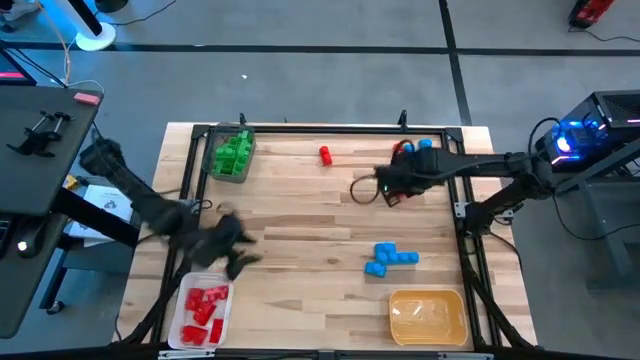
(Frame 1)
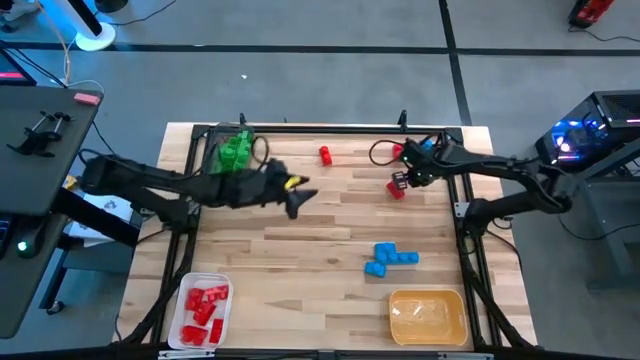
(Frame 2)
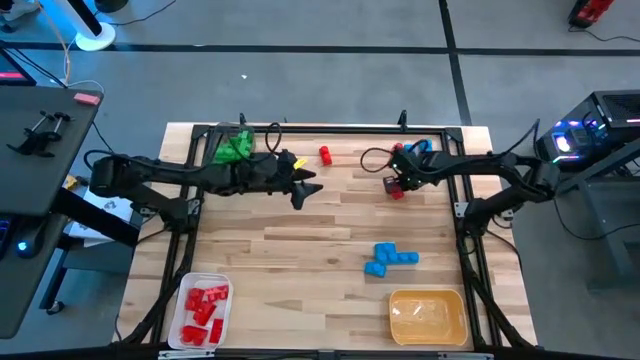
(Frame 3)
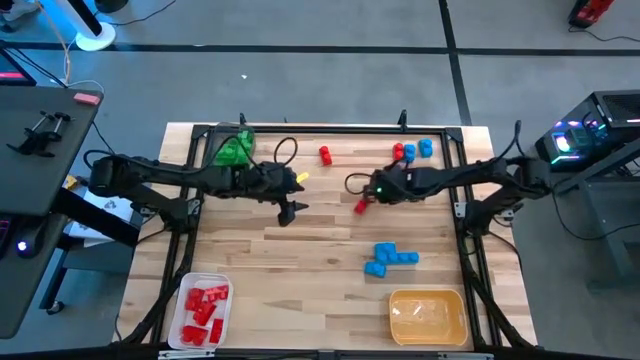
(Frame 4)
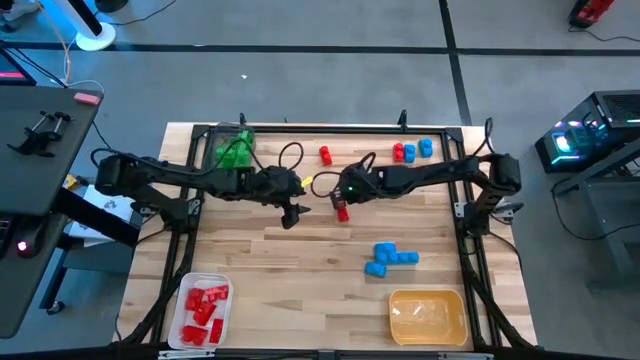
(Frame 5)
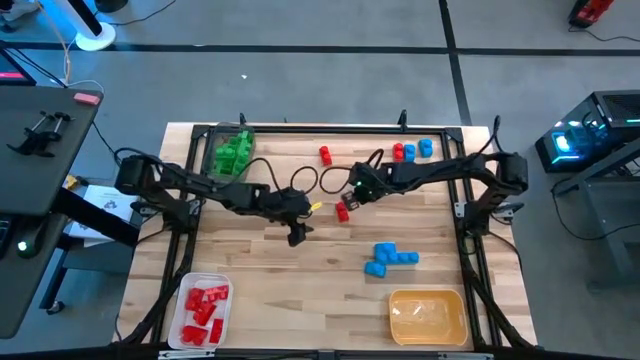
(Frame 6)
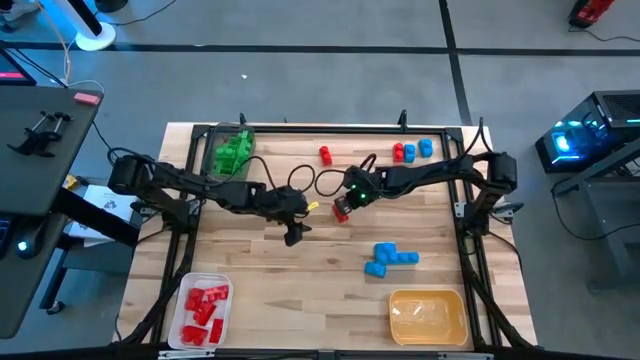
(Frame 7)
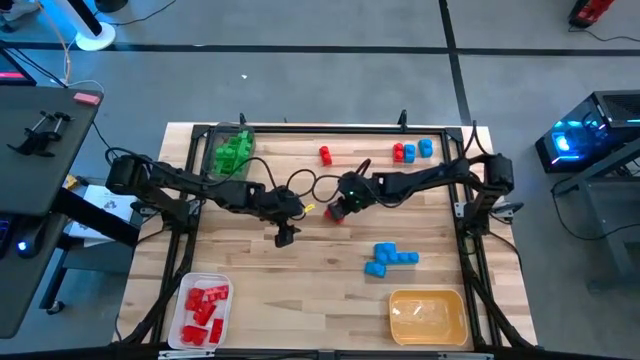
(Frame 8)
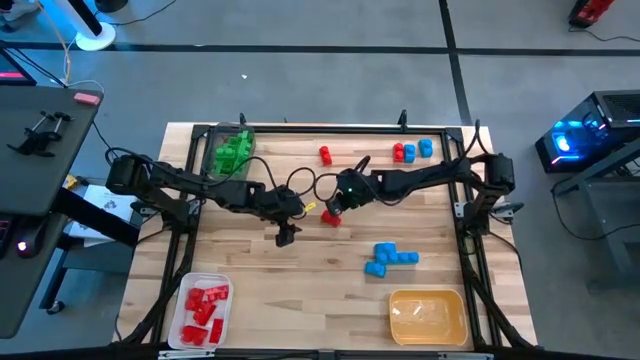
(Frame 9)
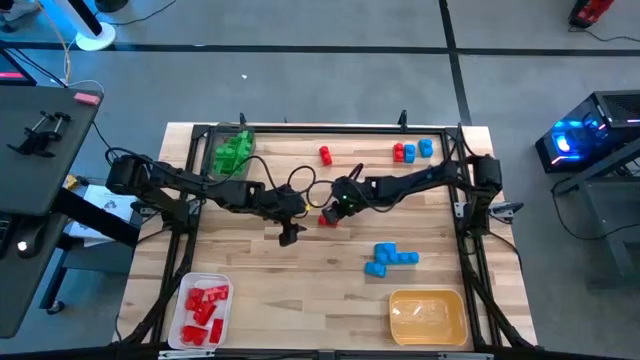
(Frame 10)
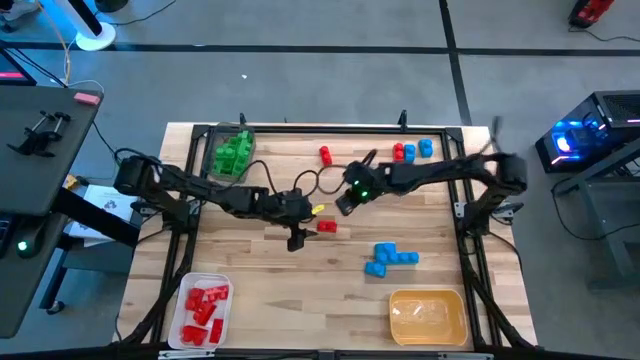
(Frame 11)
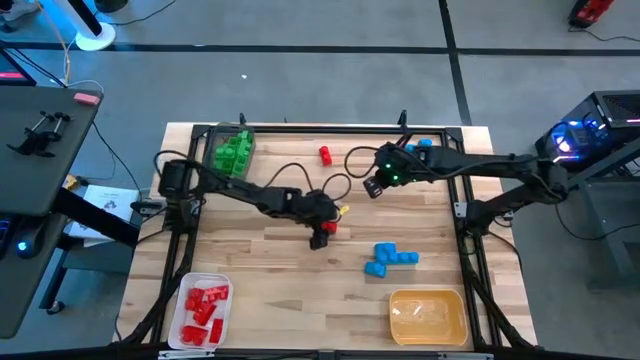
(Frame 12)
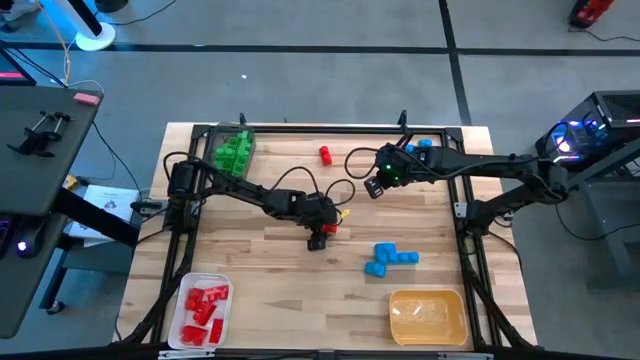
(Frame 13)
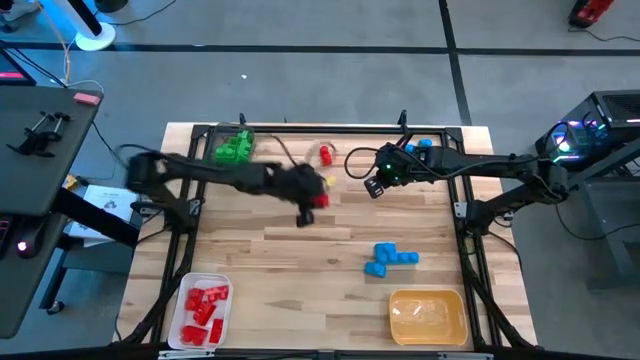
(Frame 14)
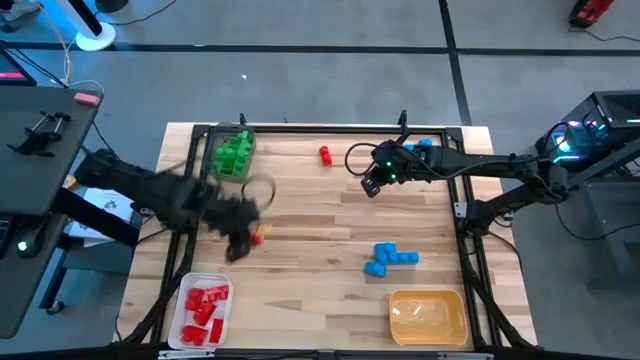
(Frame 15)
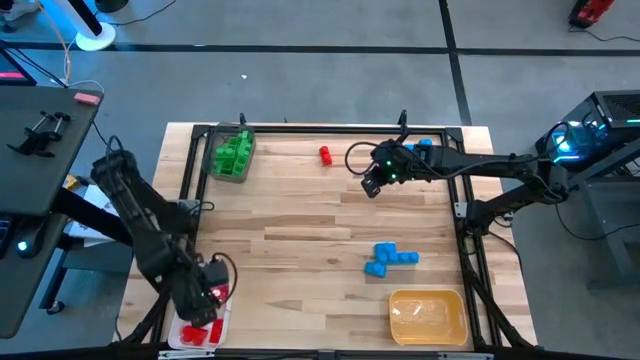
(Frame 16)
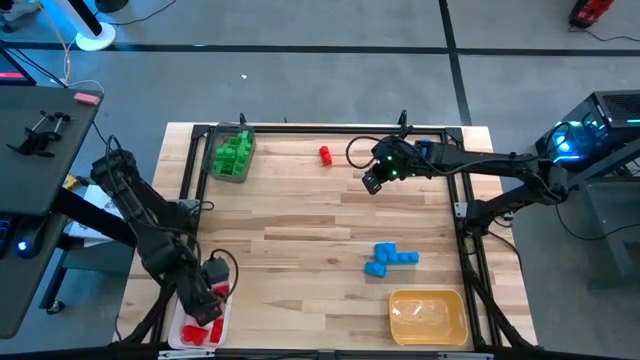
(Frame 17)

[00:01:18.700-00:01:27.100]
Task: Sort blocks
Put the red game piece into the white bin

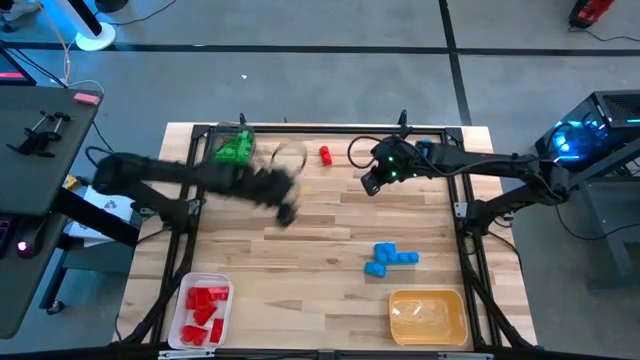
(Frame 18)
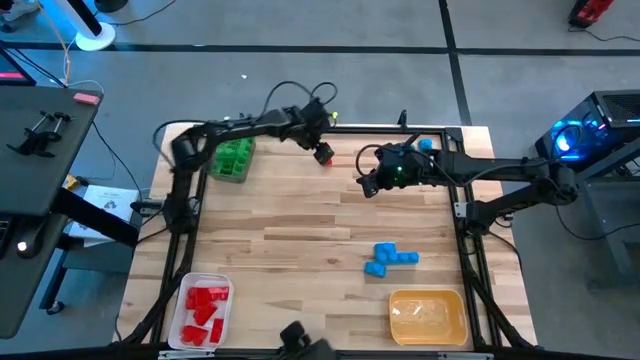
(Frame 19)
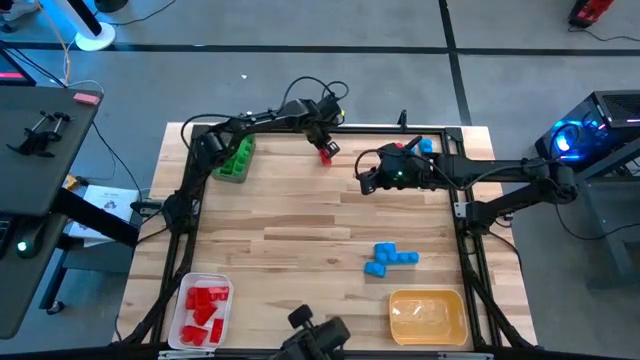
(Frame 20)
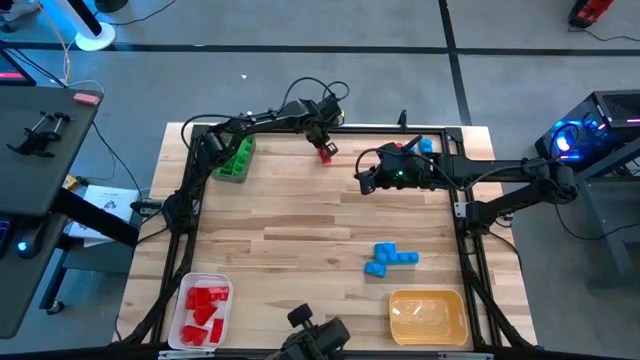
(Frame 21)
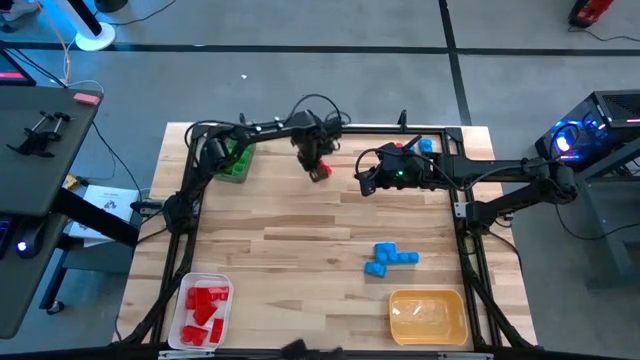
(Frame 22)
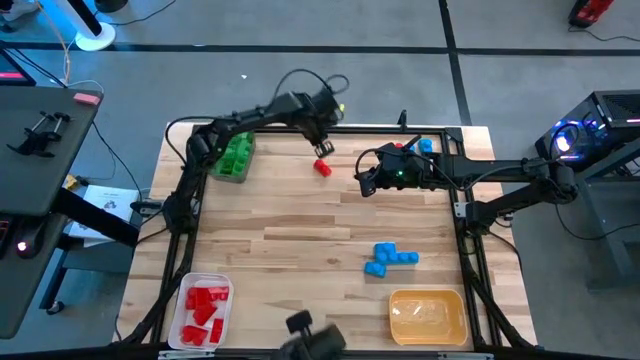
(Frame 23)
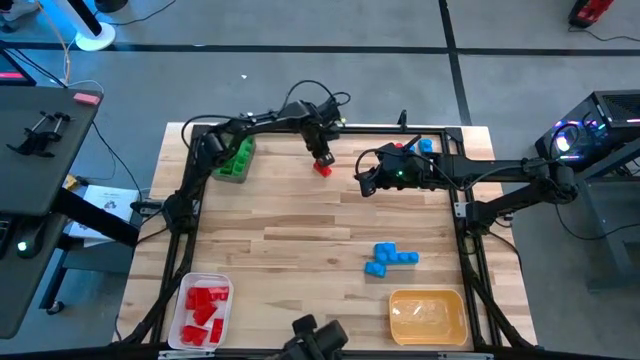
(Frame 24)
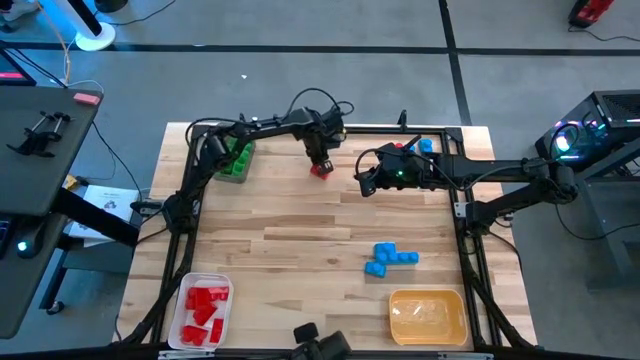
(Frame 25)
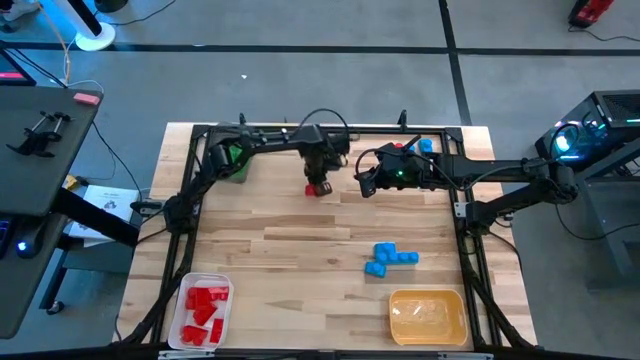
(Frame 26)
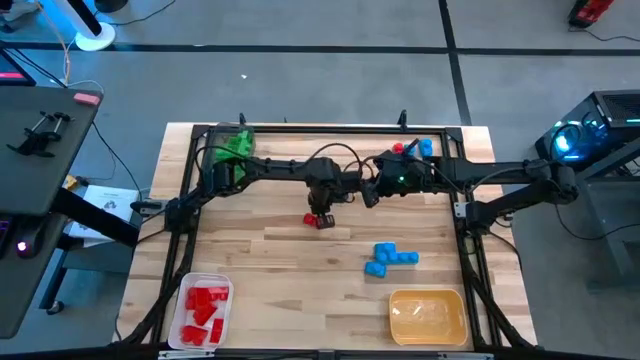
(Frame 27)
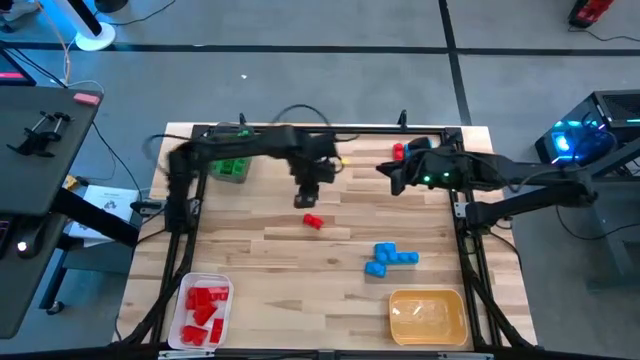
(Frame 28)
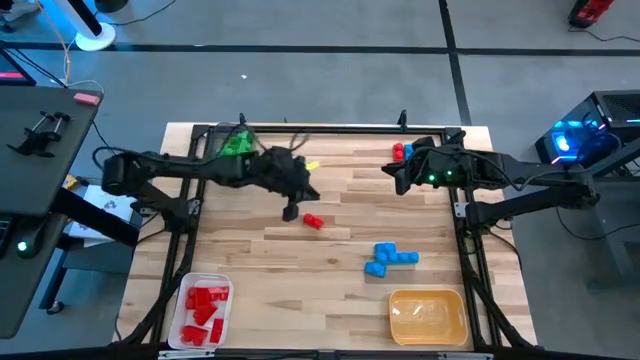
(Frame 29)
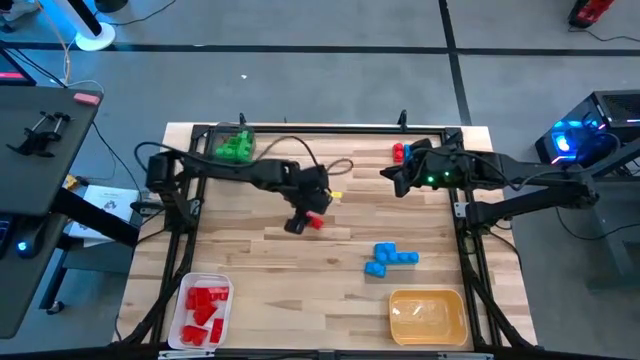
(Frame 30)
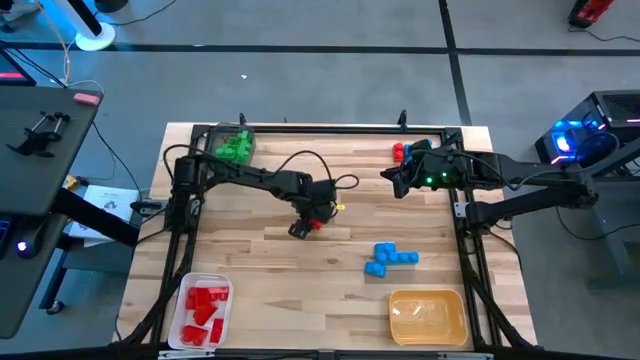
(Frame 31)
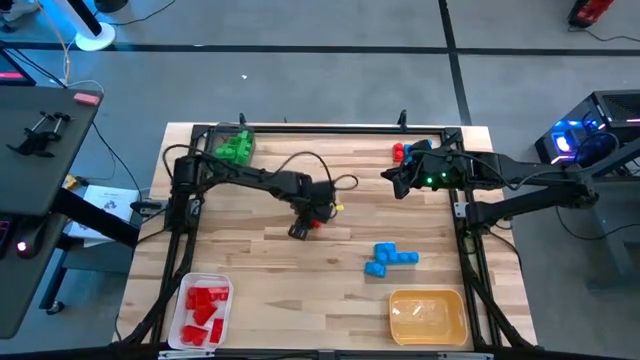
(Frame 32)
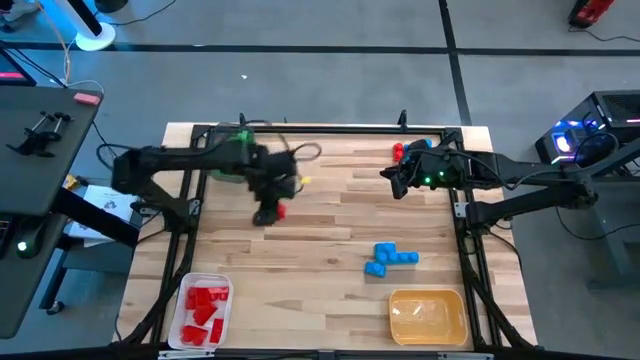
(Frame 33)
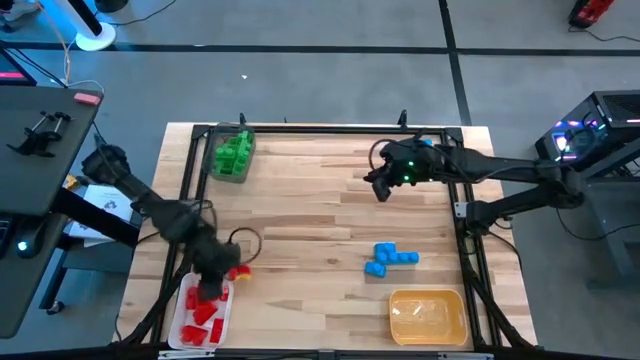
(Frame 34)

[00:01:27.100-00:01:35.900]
Put the red game piece into the white bin

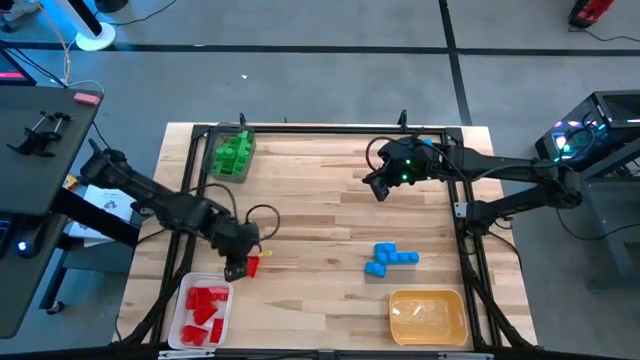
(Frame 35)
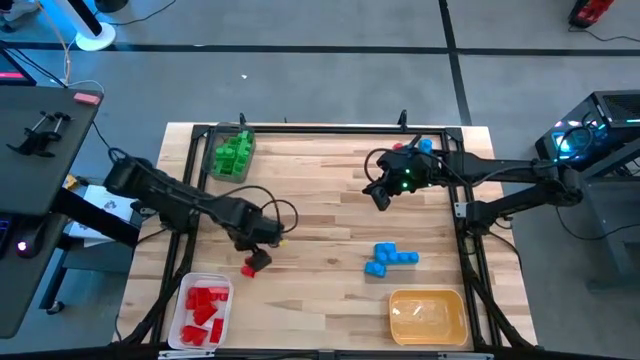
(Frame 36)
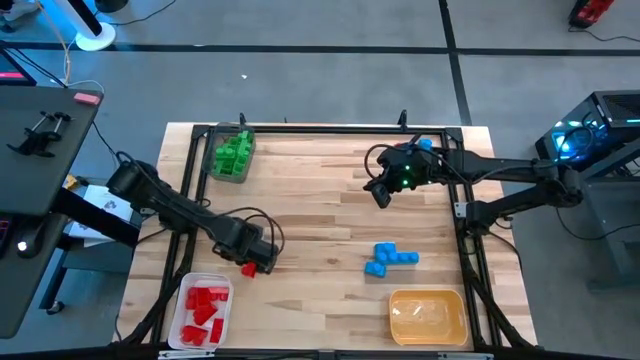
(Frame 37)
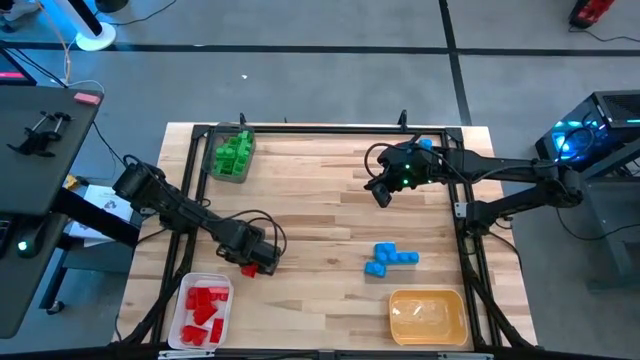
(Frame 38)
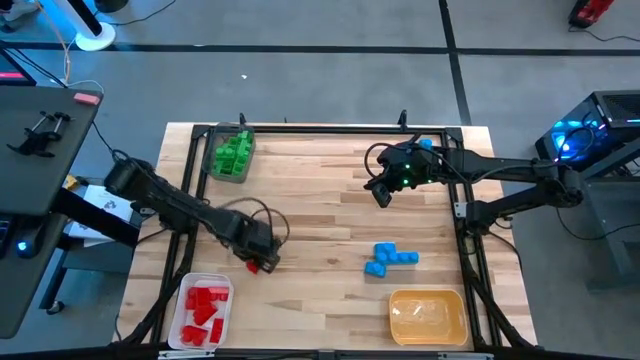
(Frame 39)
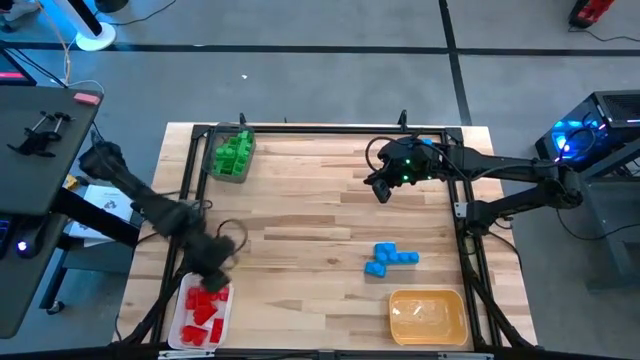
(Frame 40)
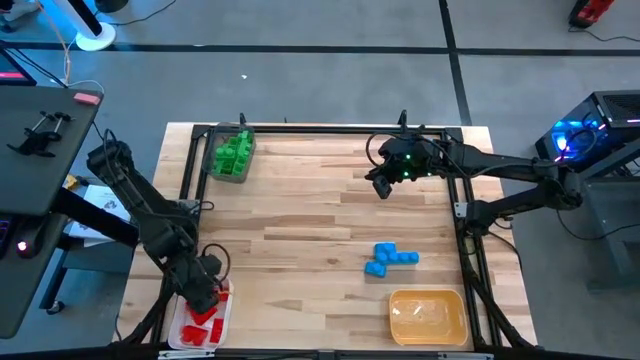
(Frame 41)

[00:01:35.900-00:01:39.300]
Put the red game piece into the white bin
